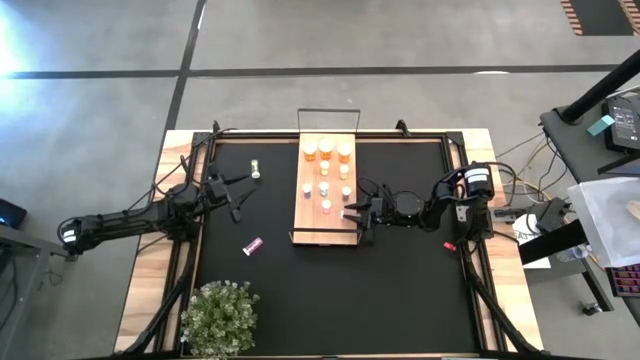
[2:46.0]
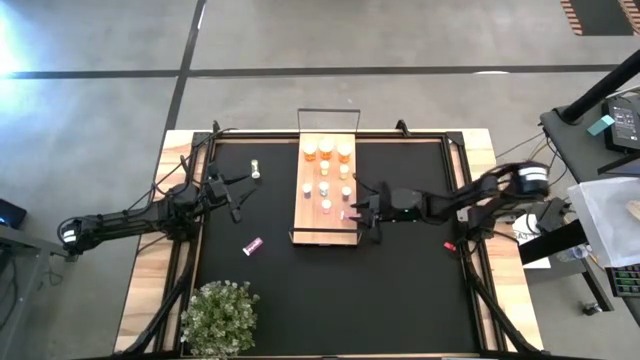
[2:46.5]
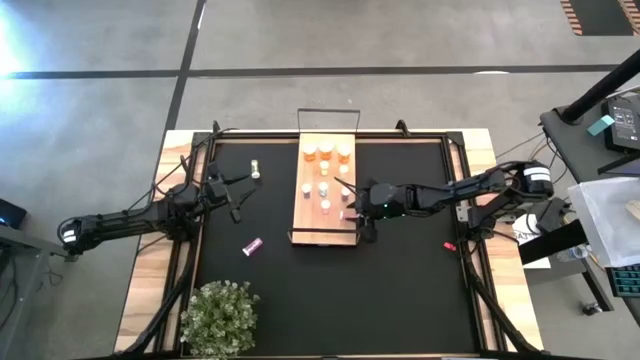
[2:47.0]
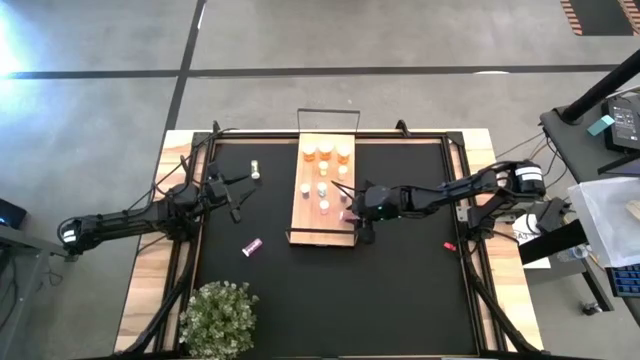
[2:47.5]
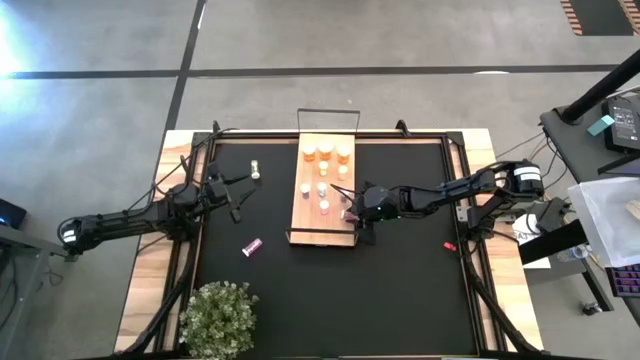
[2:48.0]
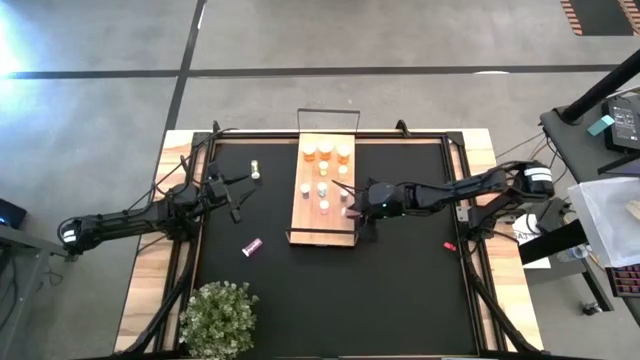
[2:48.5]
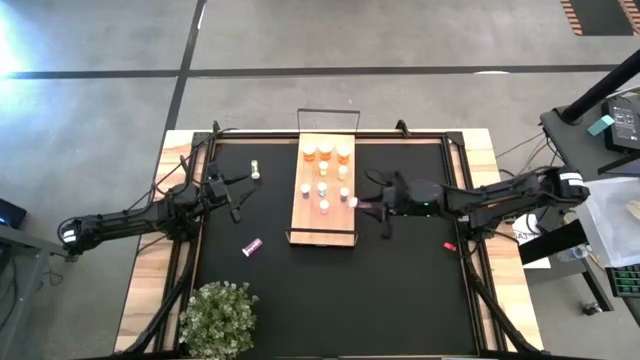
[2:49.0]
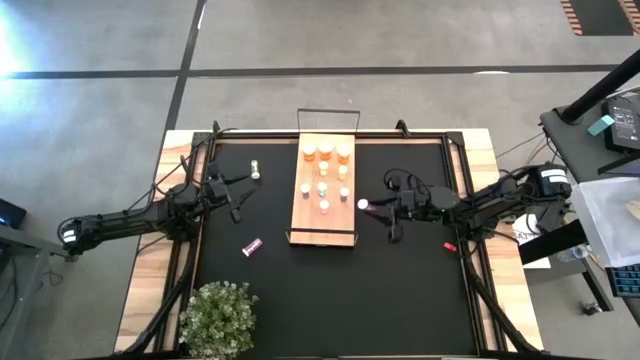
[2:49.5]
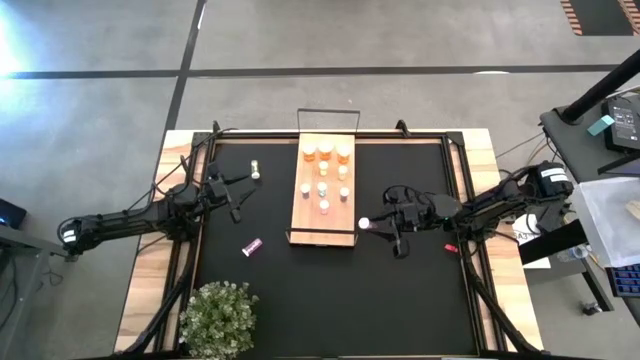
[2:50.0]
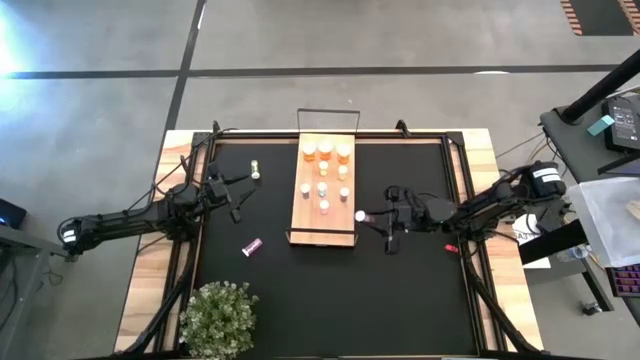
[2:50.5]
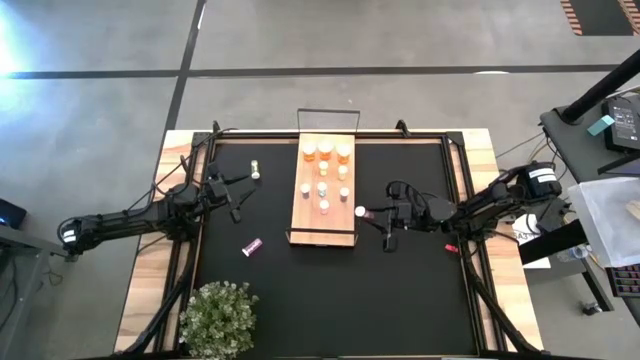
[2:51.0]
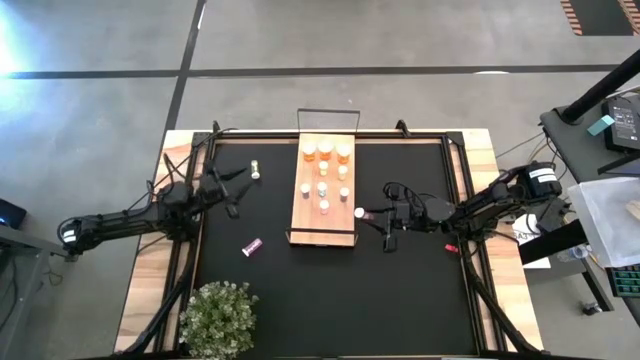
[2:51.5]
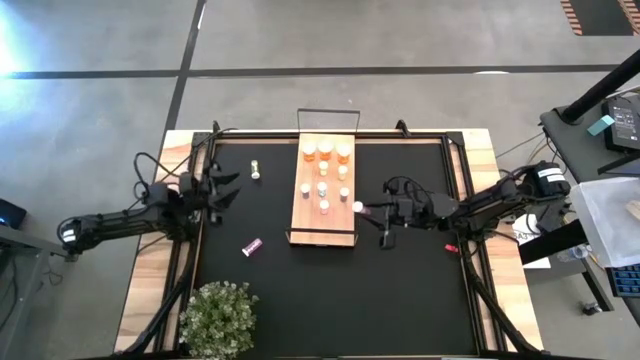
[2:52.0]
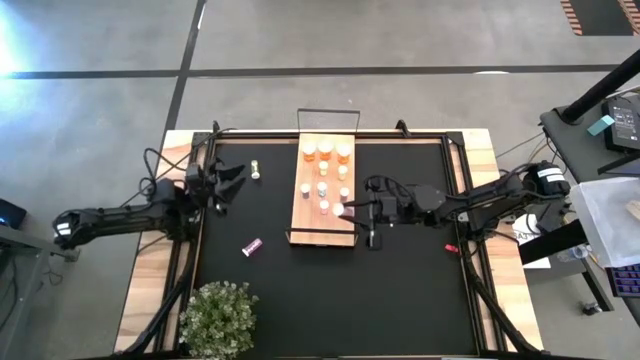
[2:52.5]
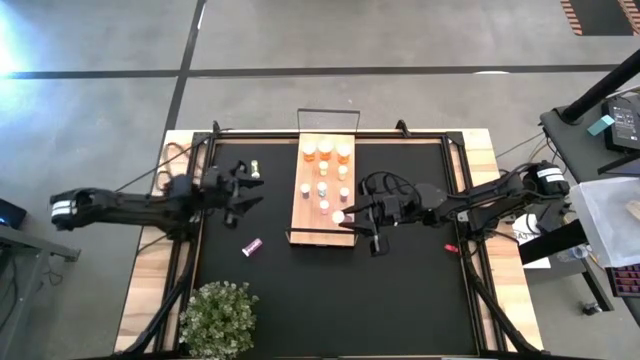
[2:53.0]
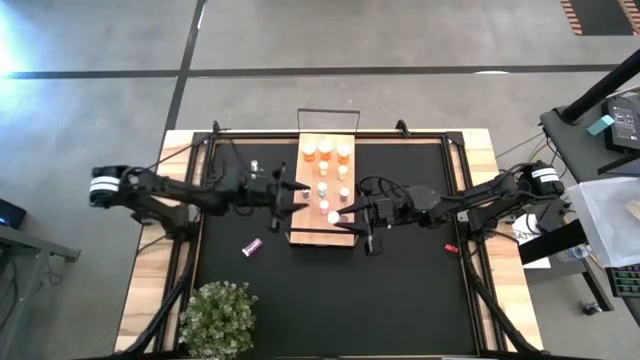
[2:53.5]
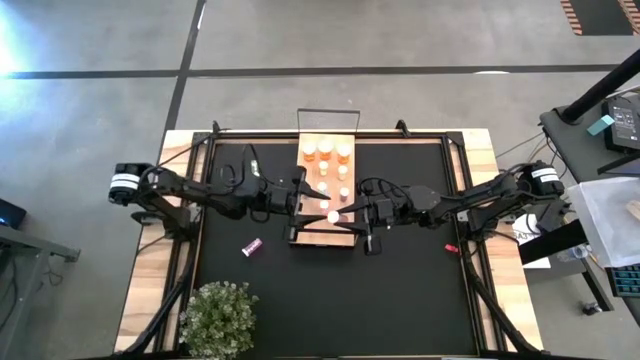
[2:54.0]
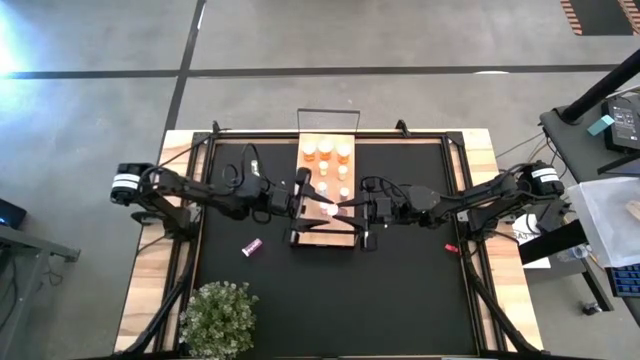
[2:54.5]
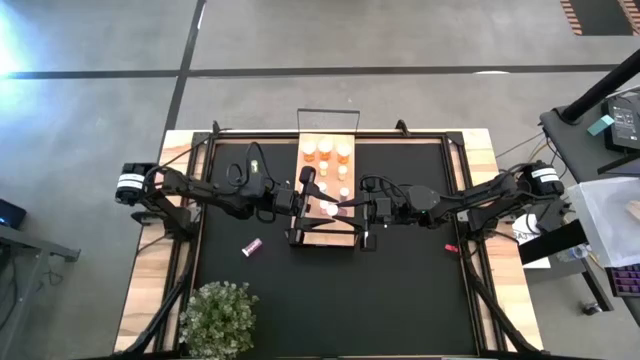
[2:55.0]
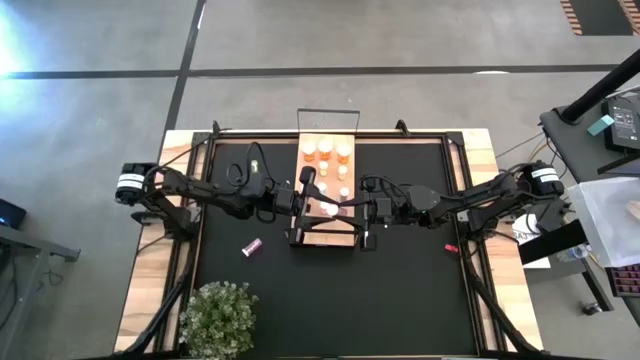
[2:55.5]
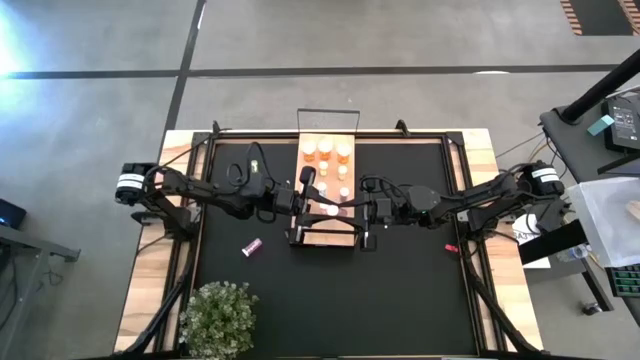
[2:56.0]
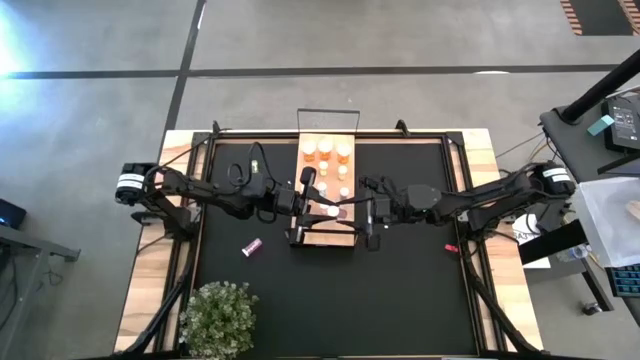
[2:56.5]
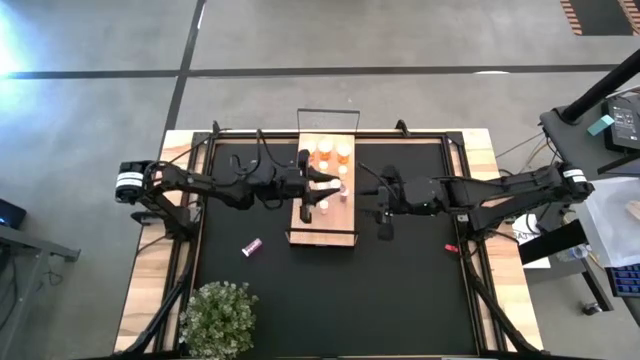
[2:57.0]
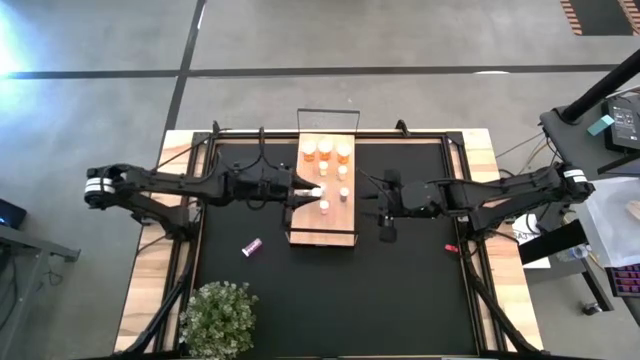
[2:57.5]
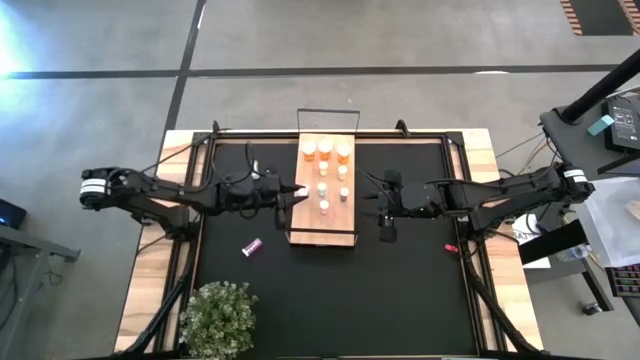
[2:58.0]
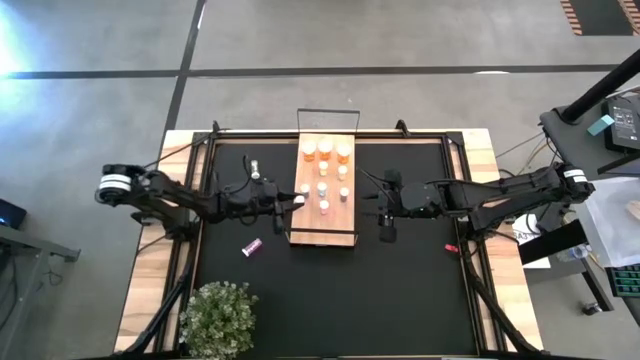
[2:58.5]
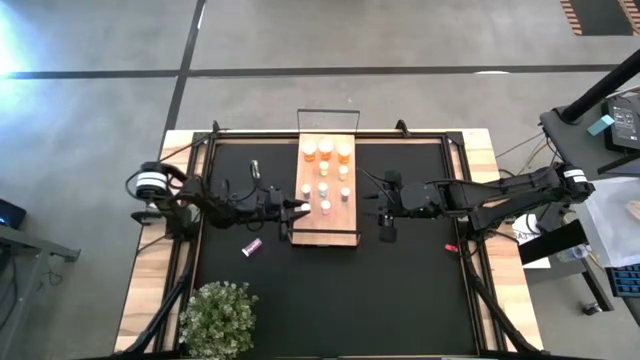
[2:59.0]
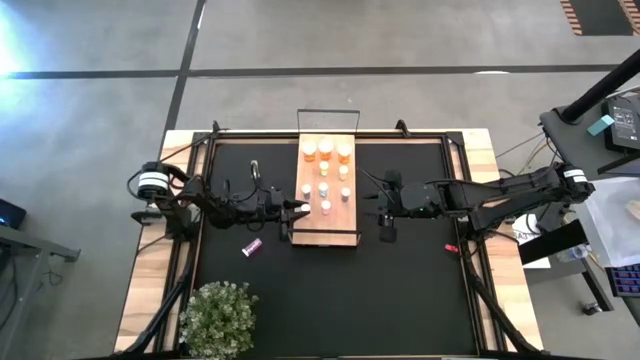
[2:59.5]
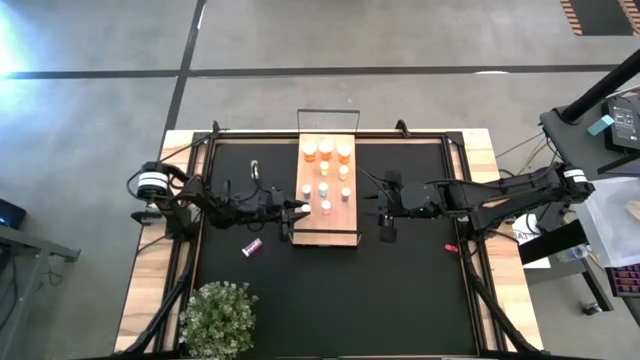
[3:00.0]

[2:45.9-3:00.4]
Task: Pick and place medicine bottles onto shelf by color
Put the bottom pink medicine bottle on the shelf aligned with the other pink medicine bottle

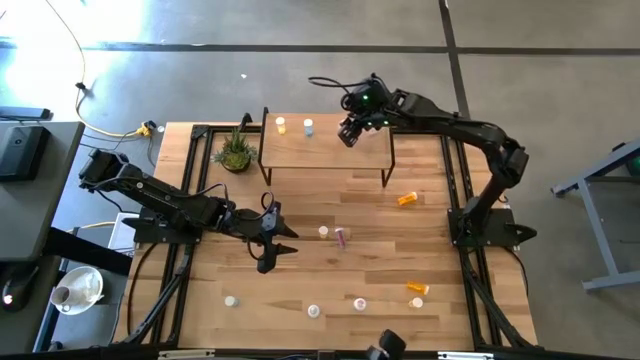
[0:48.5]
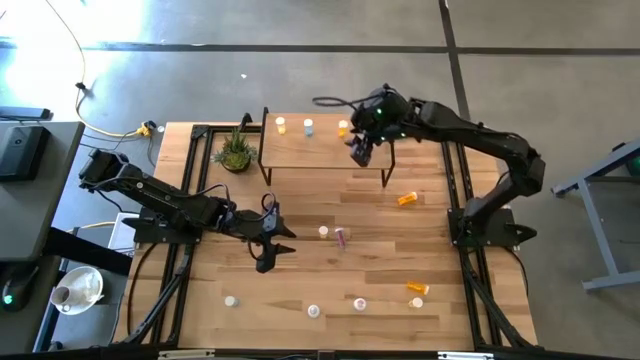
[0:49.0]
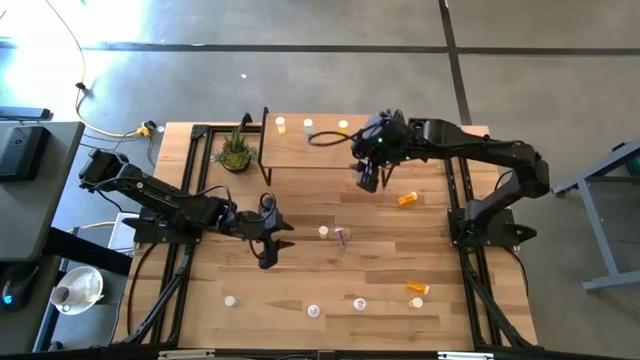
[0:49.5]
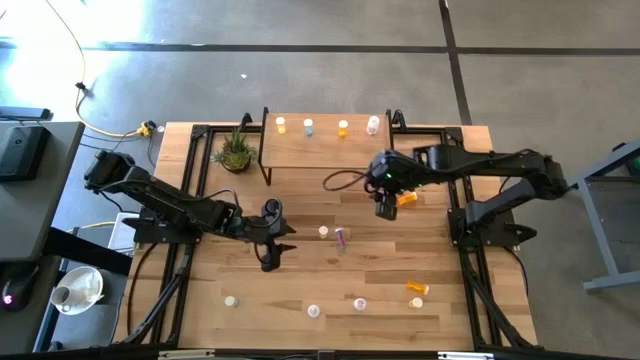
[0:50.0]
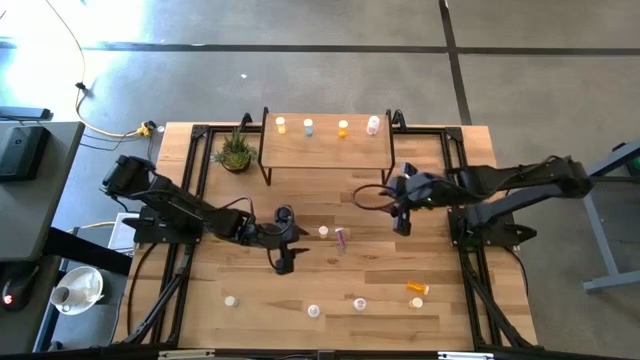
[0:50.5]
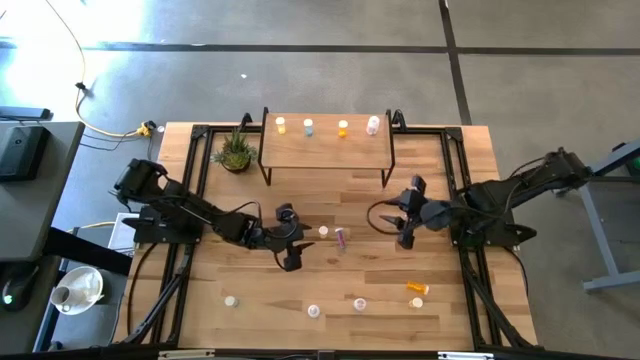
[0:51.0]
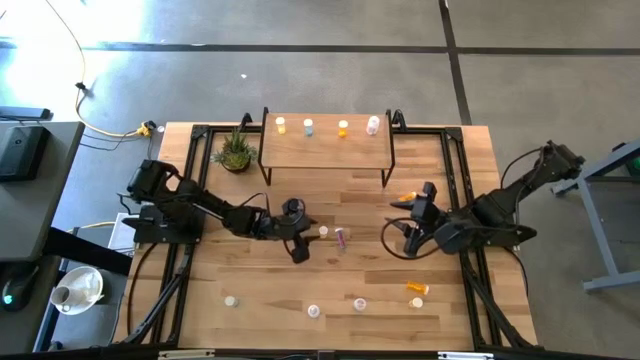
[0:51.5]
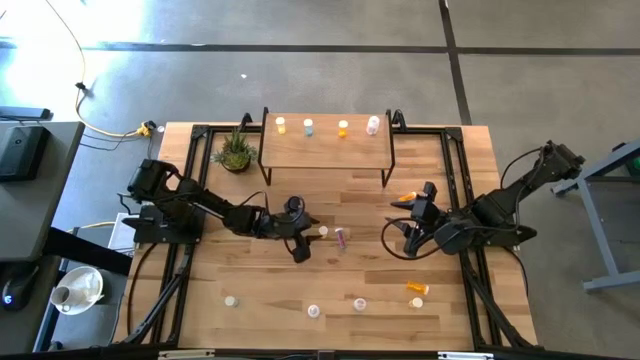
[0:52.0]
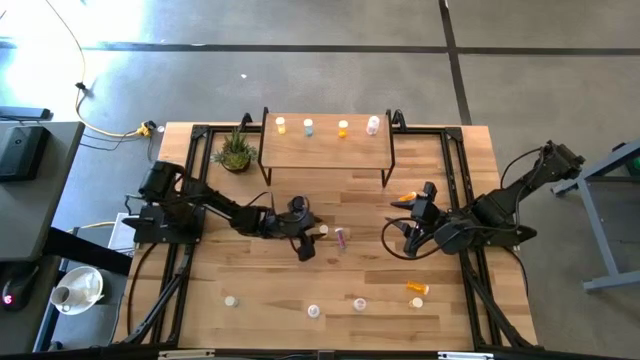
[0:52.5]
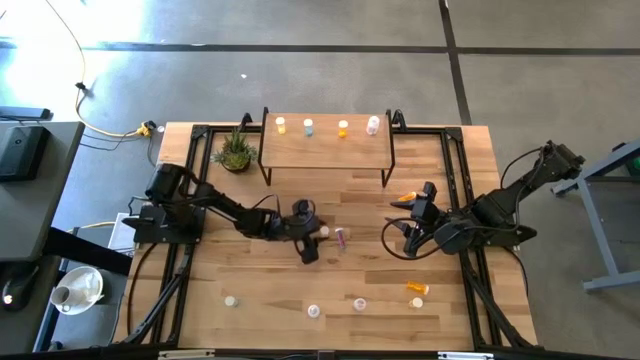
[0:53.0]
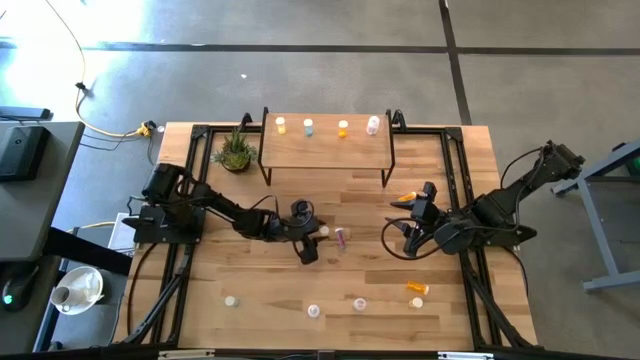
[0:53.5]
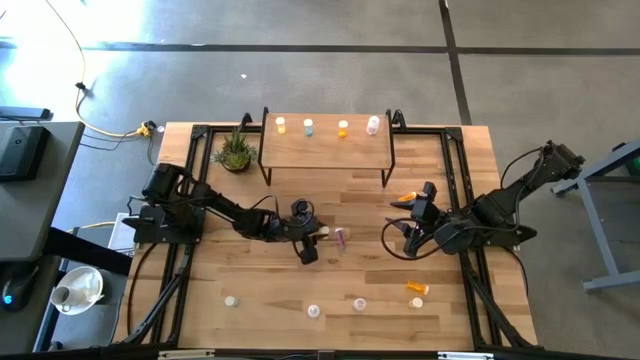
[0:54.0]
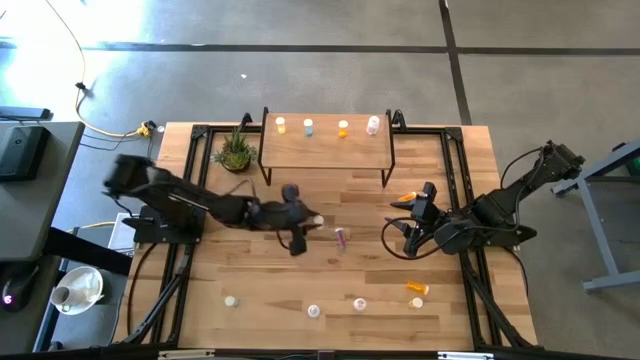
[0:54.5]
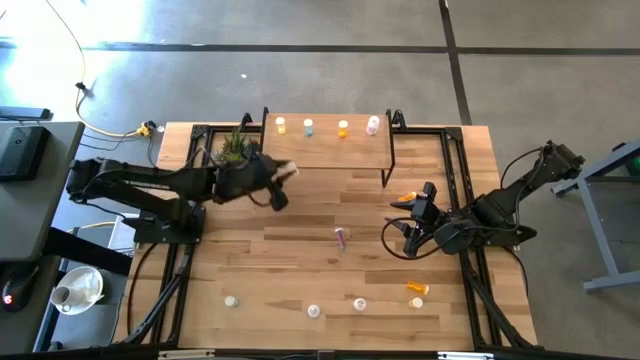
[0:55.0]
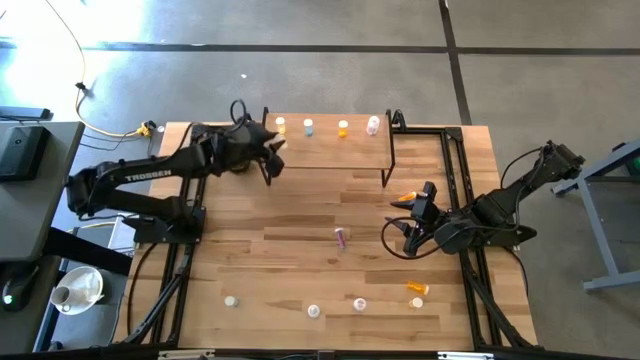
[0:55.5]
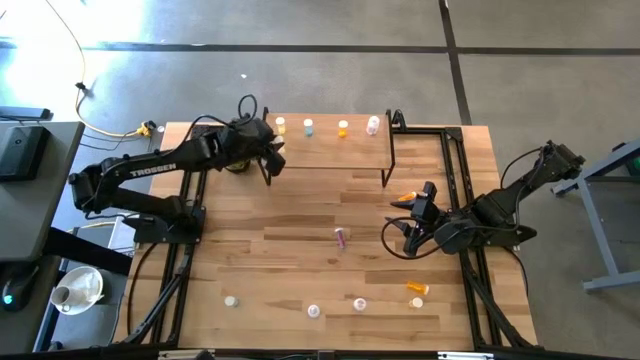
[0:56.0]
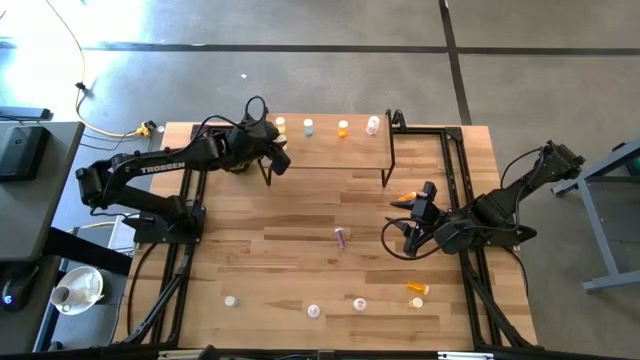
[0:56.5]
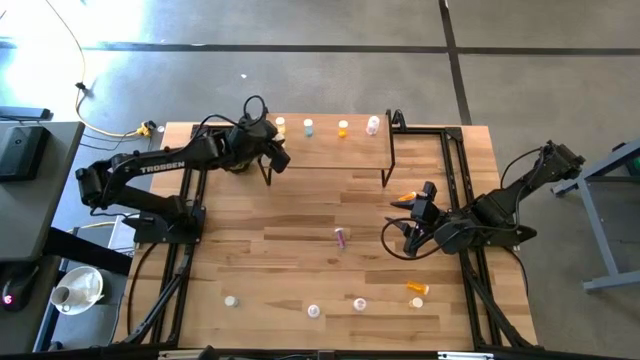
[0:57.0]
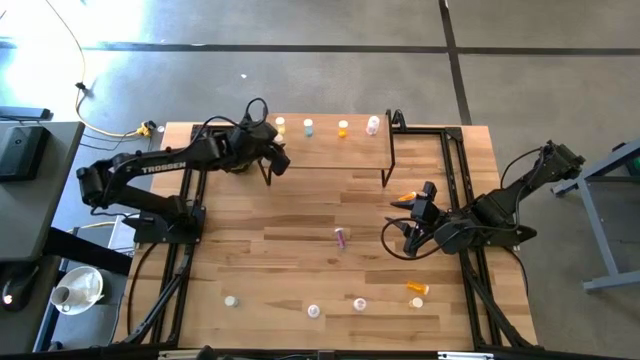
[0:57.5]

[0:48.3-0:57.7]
Task: Pick and place medicine bottles onto shelf by color
Put the top yellow pill bottle on the shelf aligned with the other yellow pill bottle
